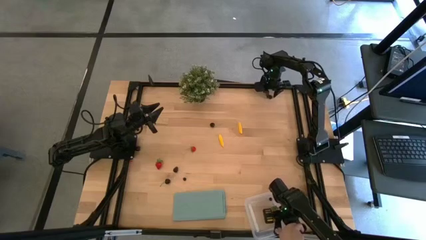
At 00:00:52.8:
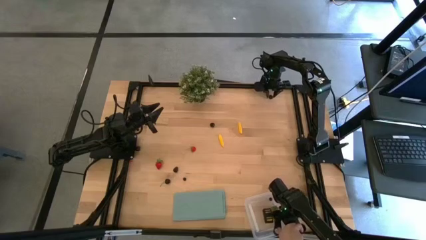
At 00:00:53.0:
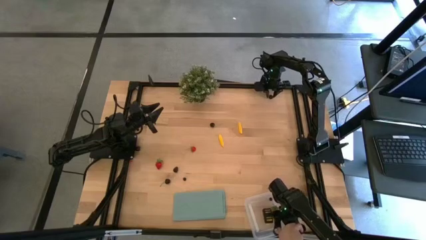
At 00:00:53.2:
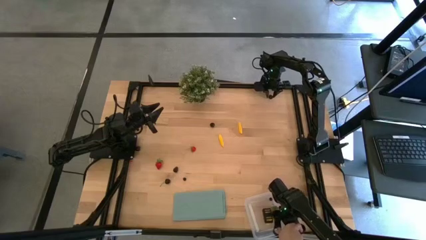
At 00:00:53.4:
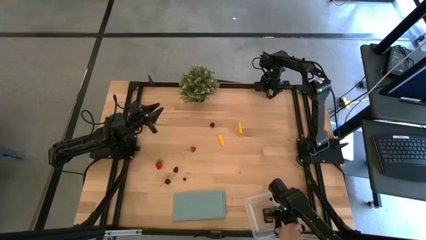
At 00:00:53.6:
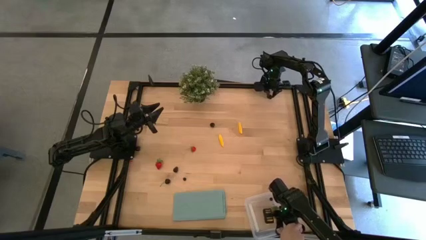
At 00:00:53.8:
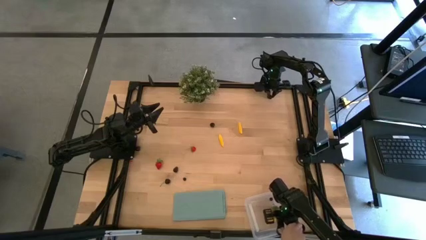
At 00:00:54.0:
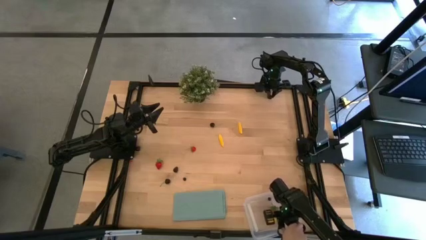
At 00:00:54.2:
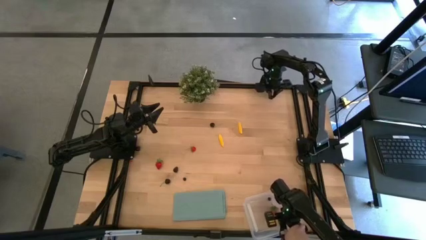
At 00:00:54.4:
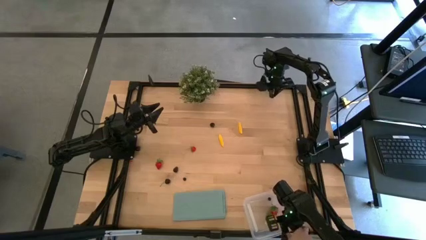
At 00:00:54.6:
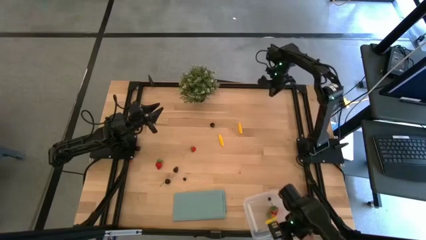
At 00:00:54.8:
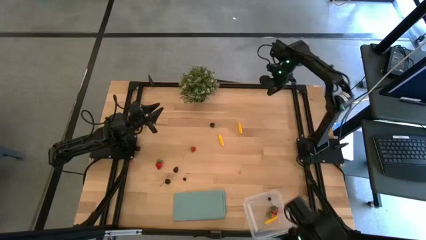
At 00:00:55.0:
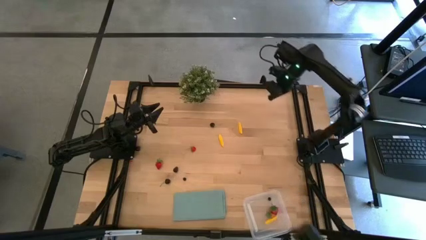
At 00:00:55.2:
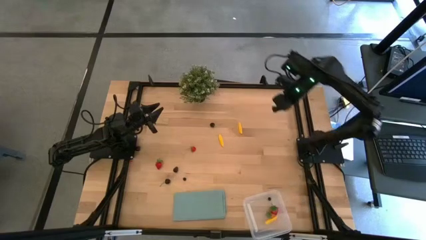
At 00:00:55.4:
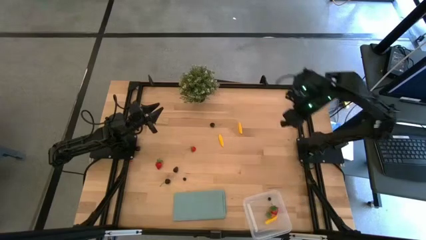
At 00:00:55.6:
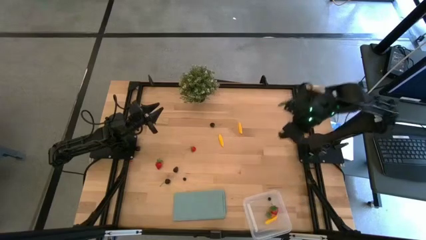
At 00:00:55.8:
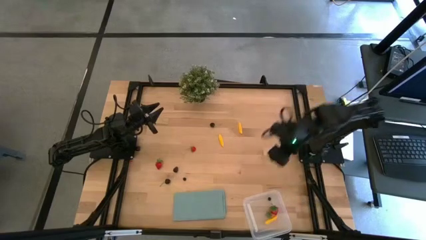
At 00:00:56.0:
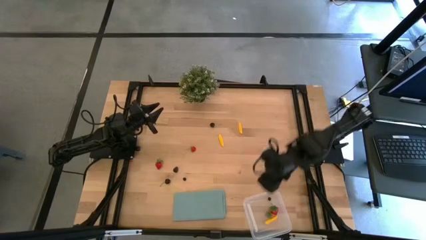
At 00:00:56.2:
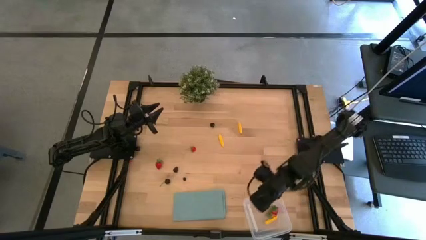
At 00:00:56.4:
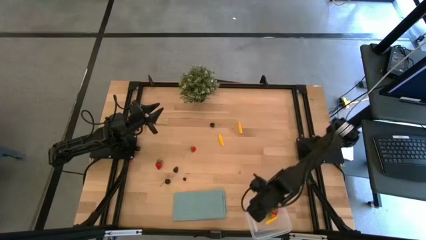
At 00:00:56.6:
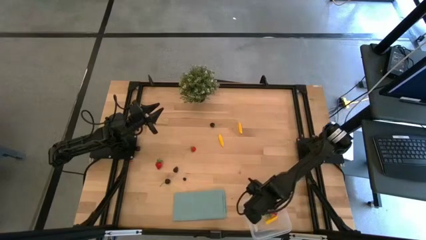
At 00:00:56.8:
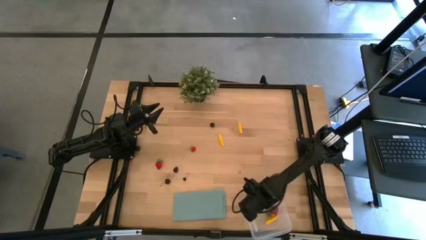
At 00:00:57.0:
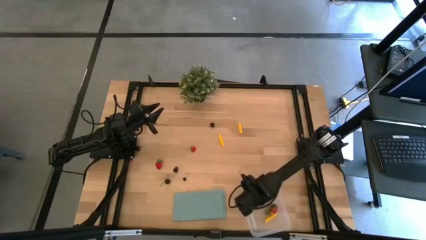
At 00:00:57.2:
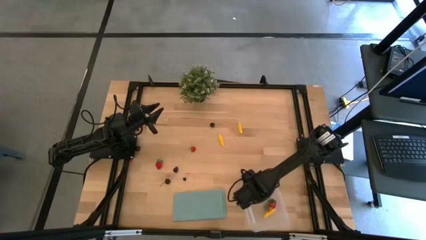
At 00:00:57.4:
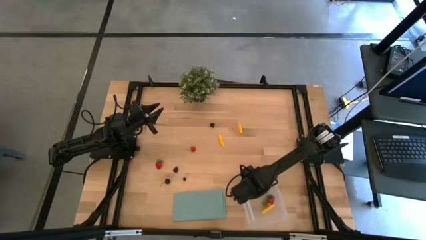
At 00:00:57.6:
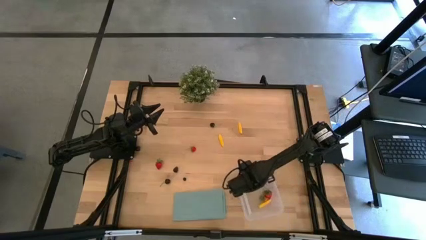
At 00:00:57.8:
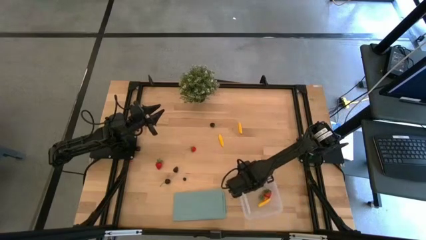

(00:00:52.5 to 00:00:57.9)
Task: Pick and placing Produce into tupperware
Put the blackberry into the transparent bin

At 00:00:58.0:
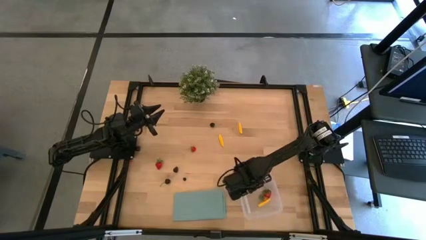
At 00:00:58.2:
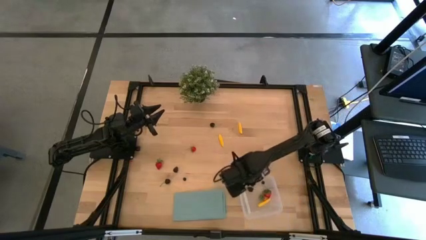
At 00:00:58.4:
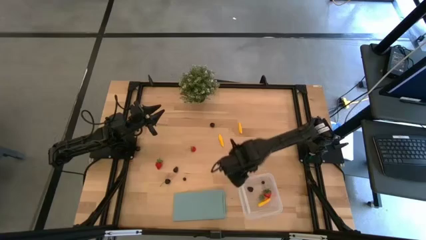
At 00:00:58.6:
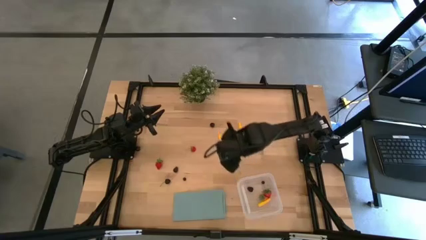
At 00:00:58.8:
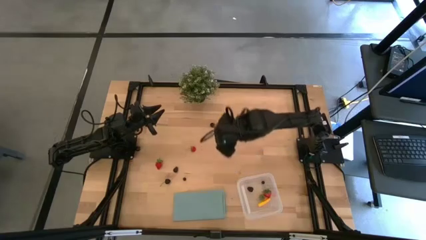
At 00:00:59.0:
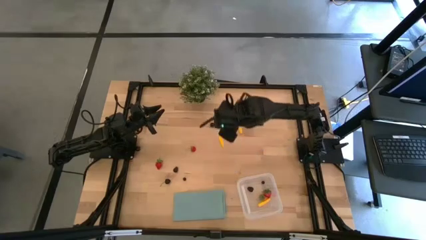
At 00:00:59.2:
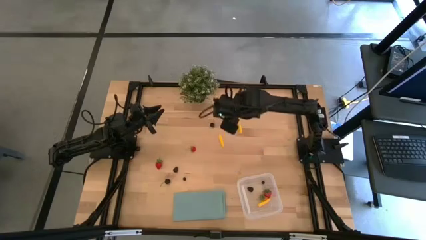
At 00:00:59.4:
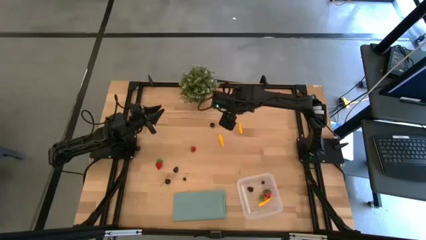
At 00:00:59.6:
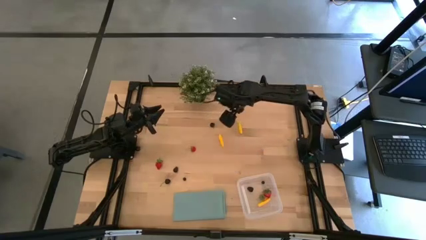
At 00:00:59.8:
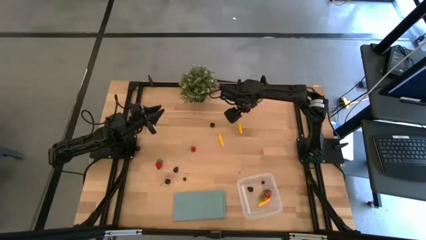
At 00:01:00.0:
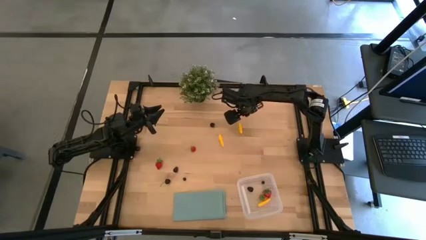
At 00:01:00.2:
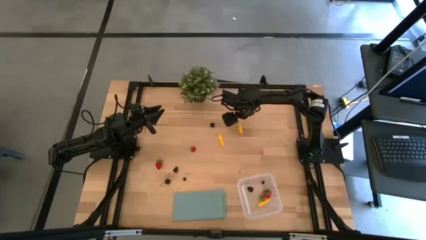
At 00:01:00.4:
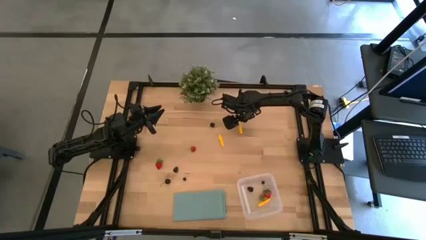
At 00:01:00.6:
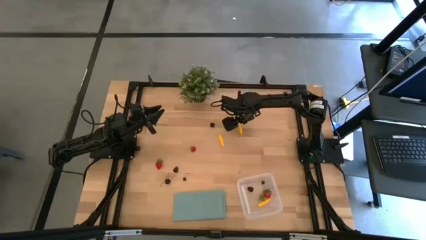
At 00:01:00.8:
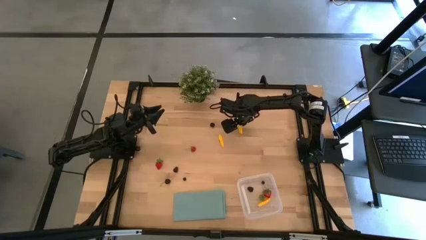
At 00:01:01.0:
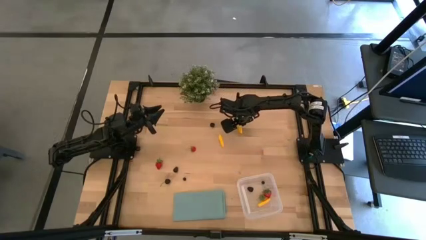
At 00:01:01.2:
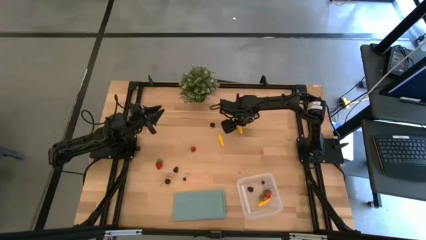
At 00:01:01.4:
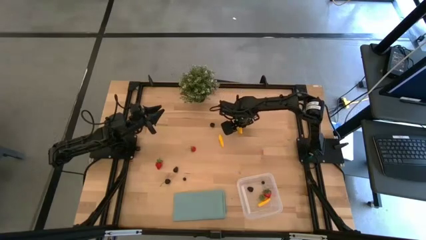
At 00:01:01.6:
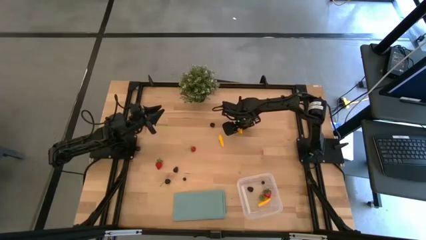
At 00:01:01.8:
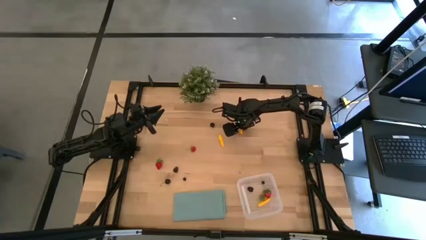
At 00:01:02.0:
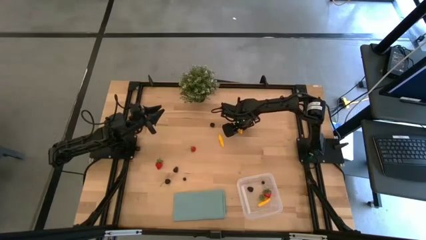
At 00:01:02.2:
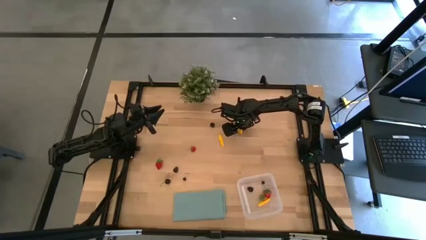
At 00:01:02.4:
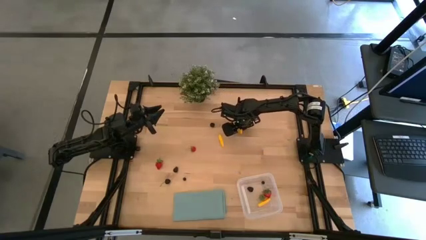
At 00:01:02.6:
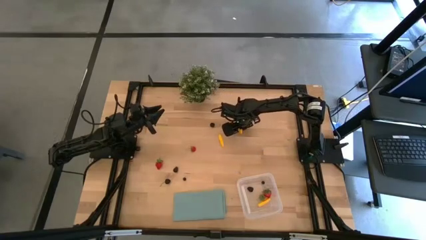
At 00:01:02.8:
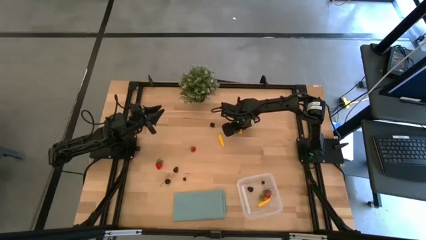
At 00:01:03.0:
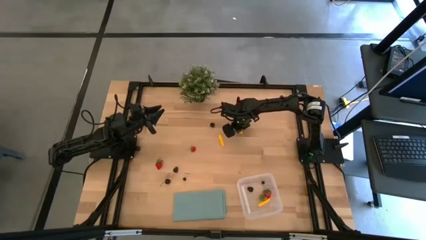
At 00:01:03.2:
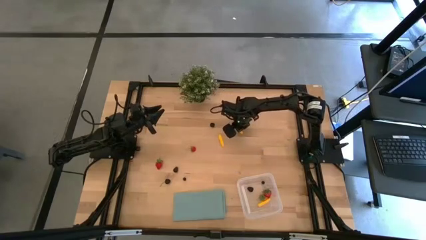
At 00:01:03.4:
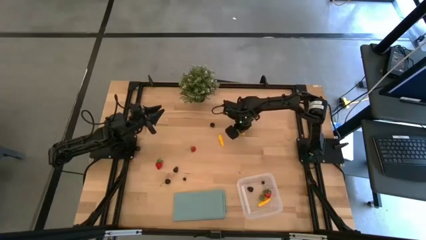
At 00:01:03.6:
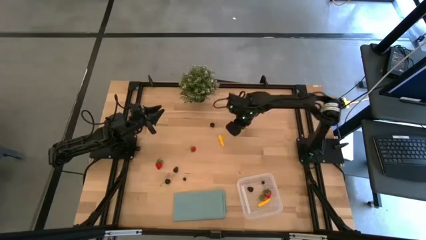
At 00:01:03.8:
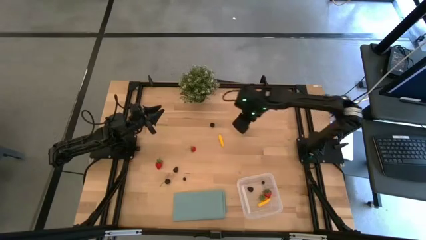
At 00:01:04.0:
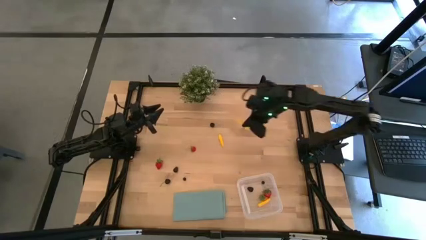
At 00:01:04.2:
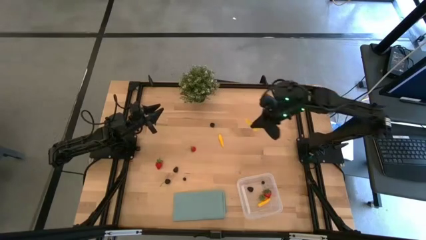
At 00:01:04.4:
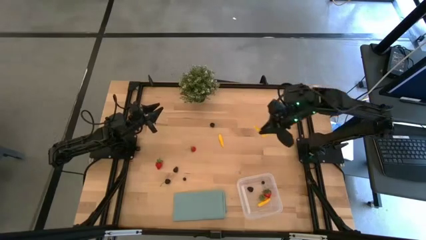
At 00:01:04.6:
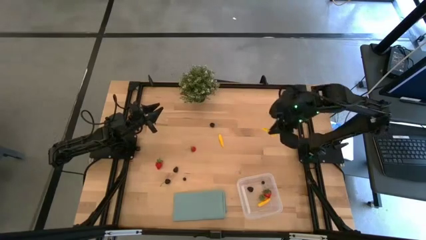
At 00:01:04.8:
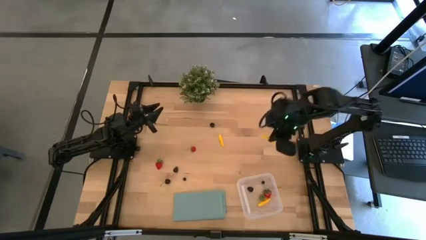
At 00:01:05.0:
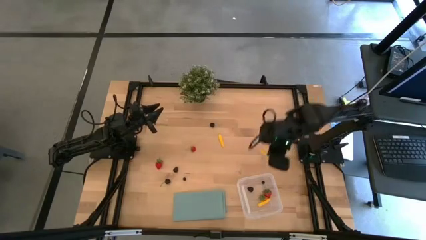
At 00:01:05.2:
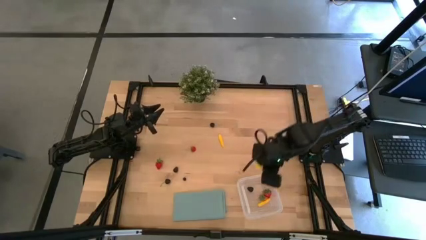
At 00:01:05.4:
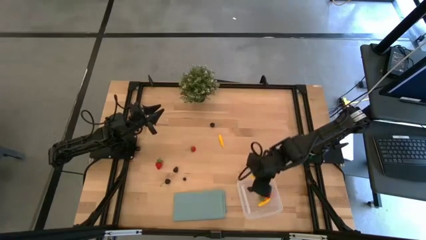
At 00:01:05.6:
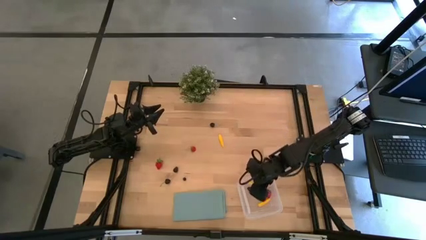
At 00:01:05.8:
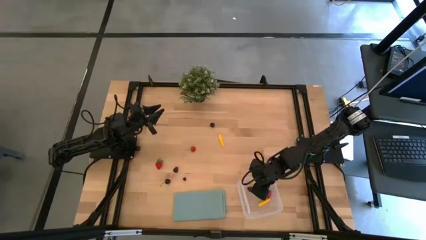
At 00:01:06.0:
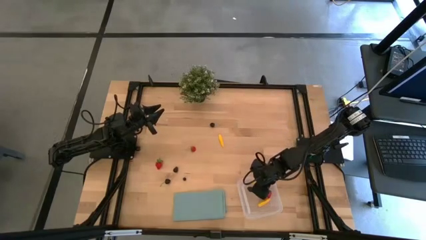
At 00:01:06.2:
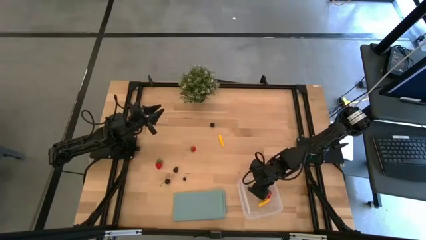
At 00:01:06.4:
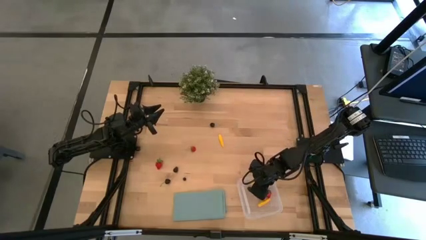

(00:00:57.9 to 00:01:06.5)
Put the yellow corn into the transparent bin
